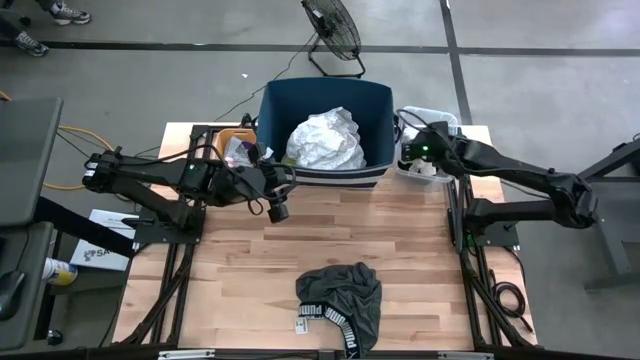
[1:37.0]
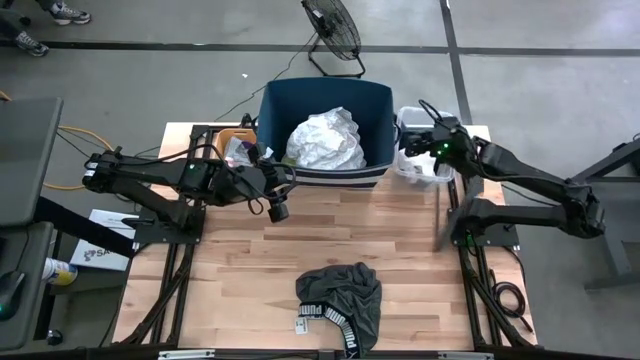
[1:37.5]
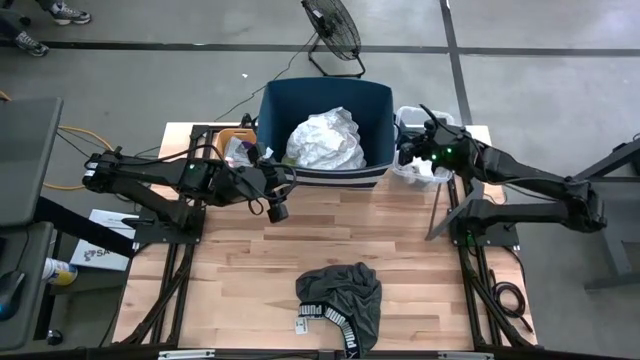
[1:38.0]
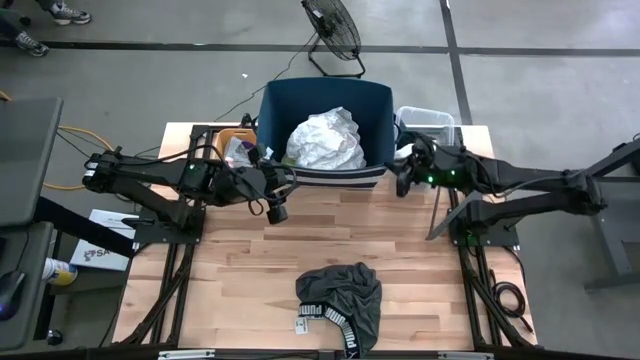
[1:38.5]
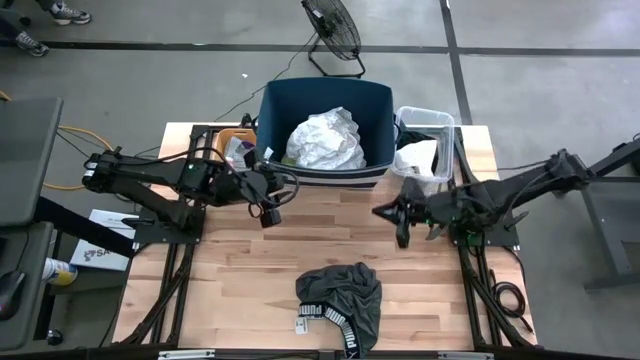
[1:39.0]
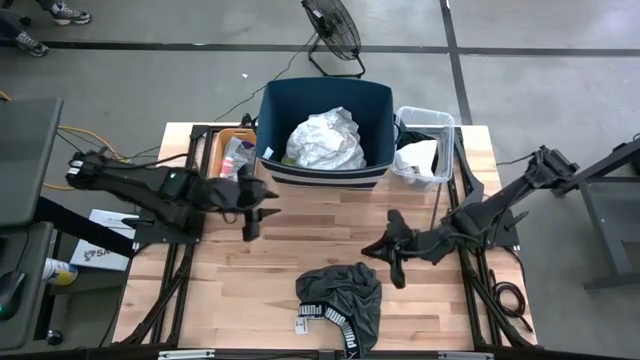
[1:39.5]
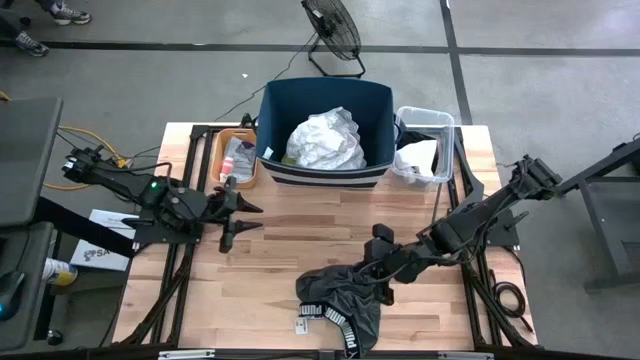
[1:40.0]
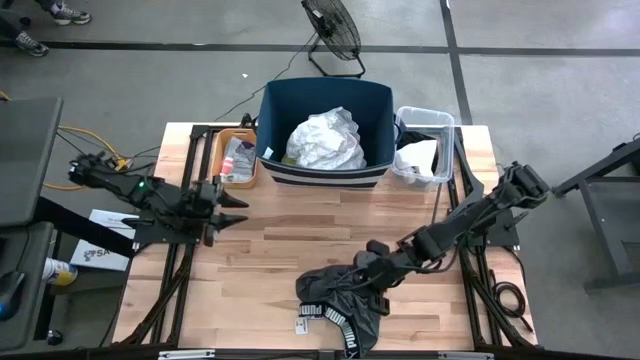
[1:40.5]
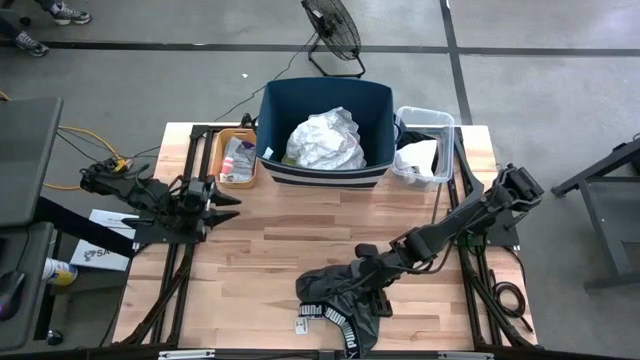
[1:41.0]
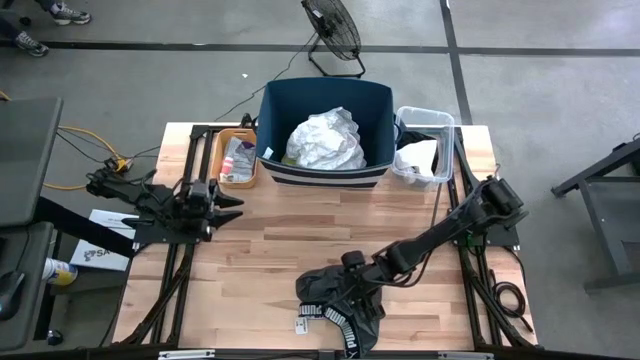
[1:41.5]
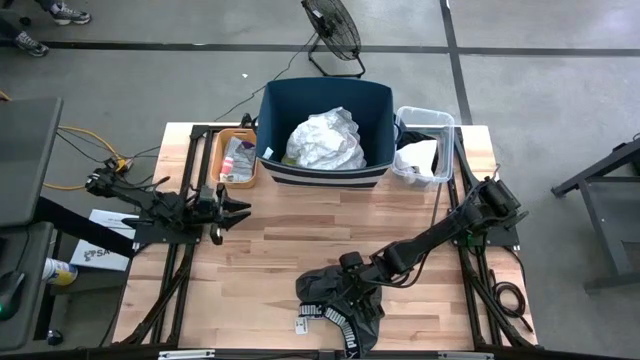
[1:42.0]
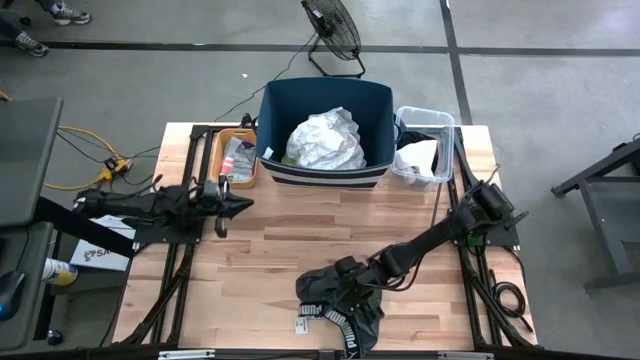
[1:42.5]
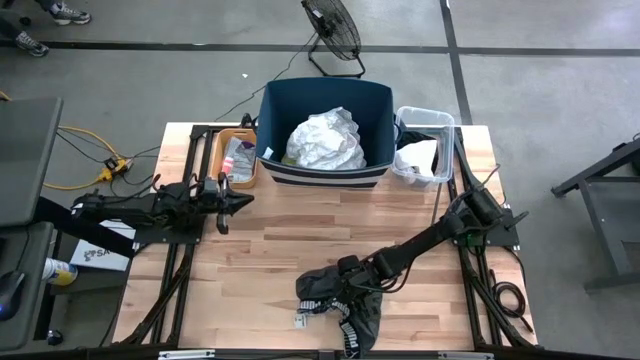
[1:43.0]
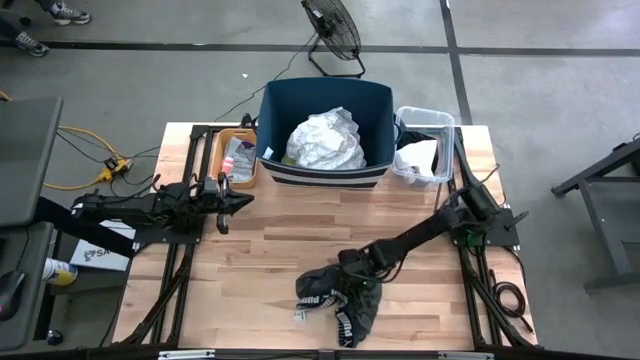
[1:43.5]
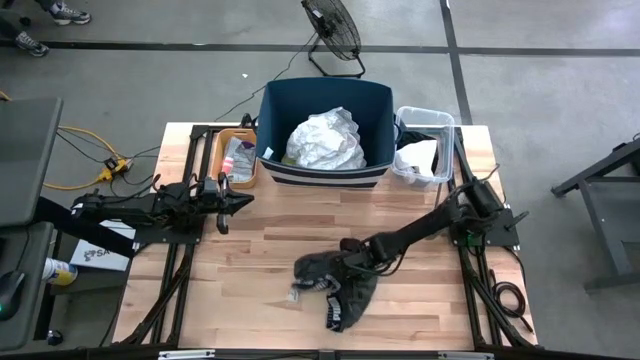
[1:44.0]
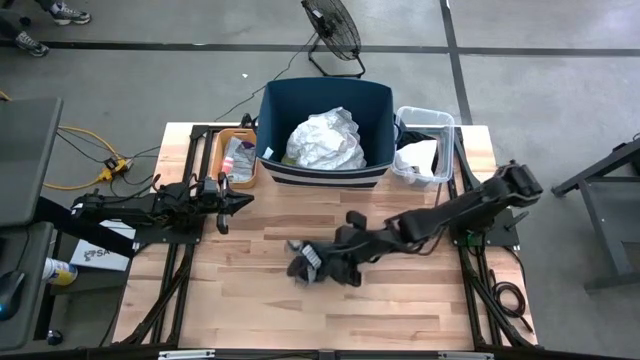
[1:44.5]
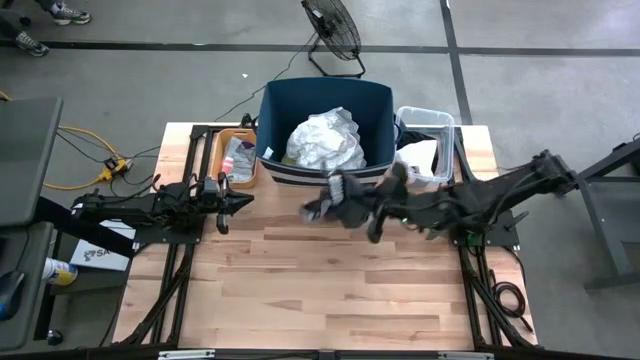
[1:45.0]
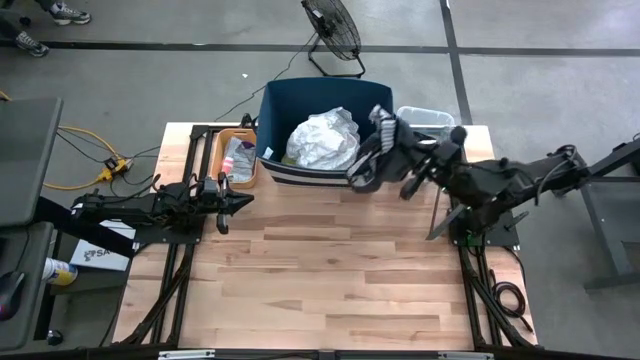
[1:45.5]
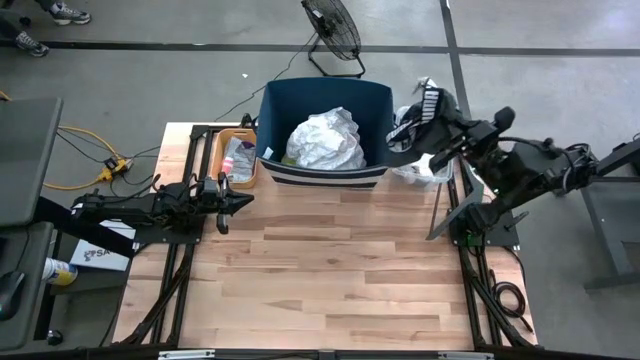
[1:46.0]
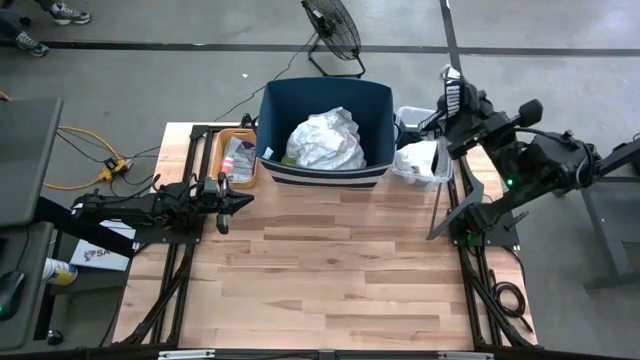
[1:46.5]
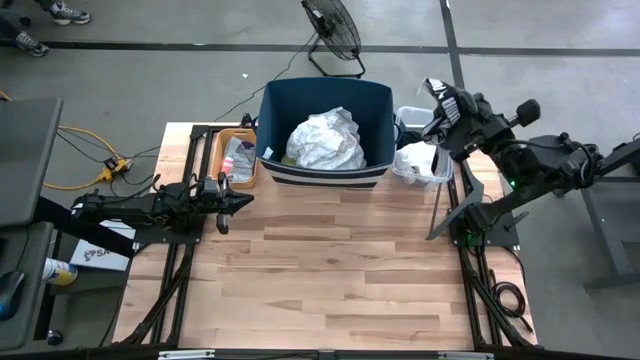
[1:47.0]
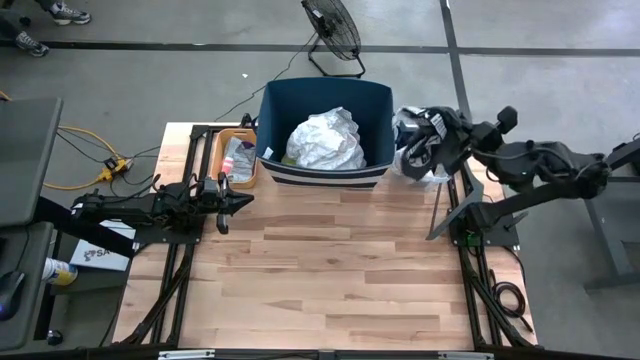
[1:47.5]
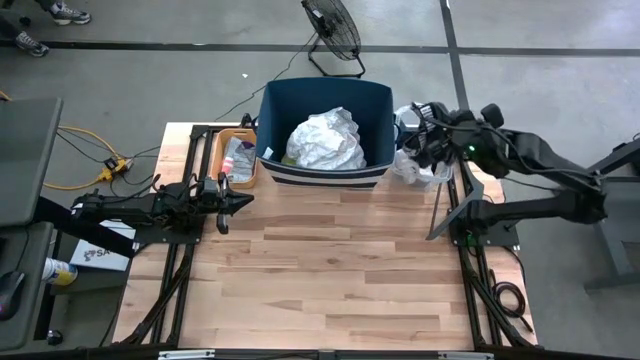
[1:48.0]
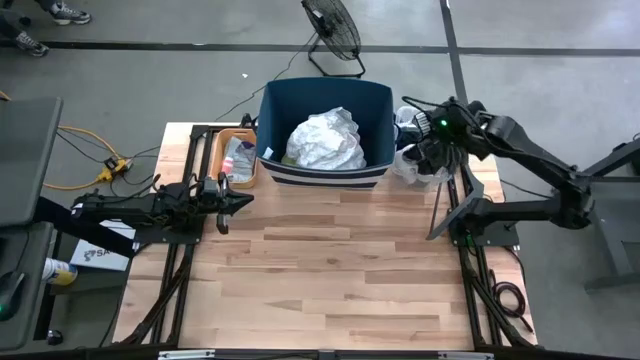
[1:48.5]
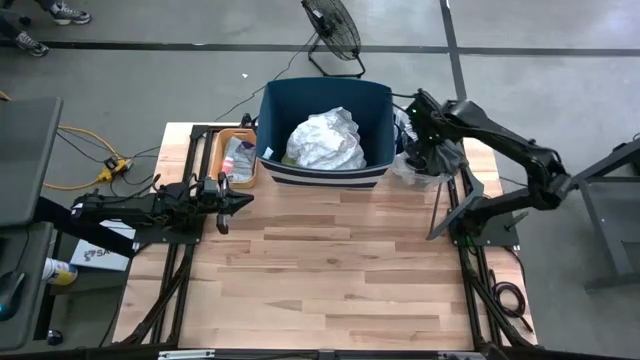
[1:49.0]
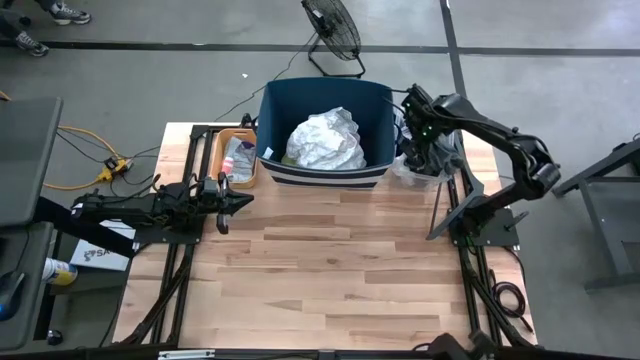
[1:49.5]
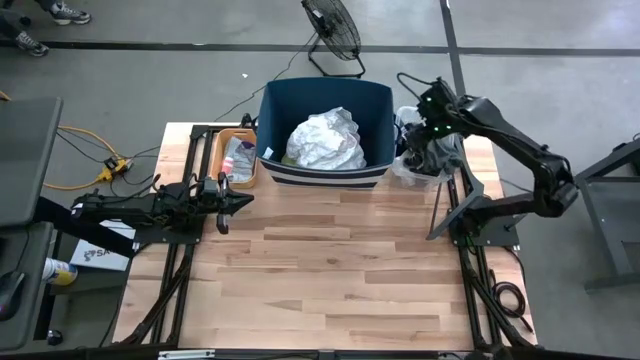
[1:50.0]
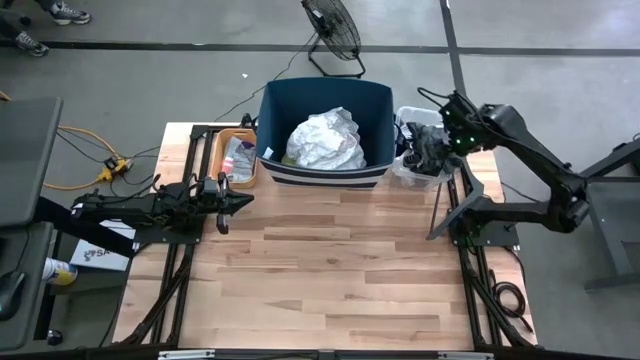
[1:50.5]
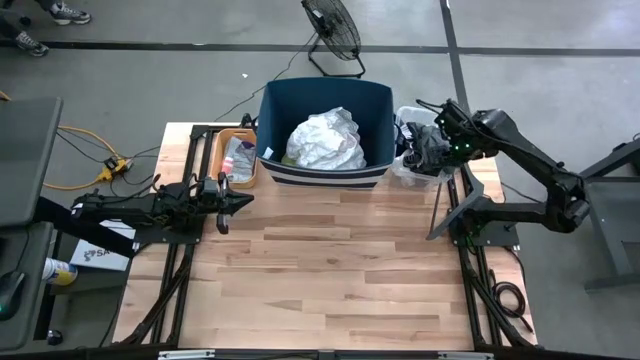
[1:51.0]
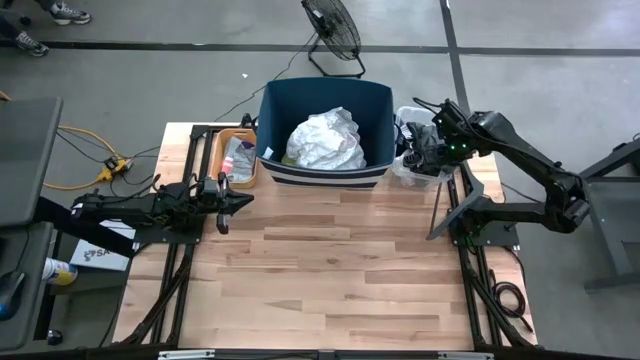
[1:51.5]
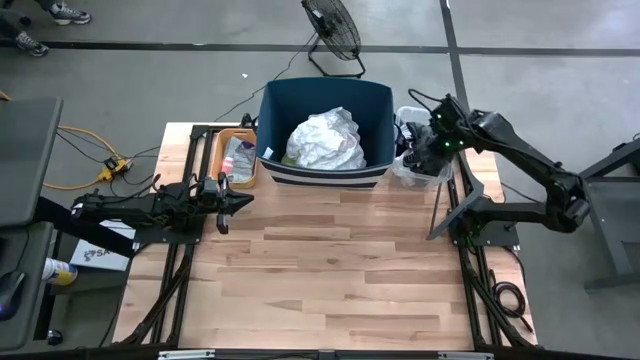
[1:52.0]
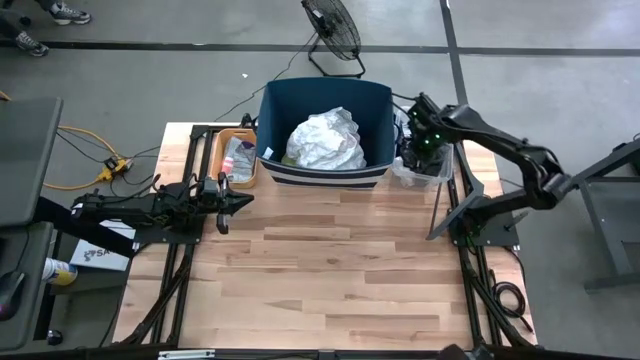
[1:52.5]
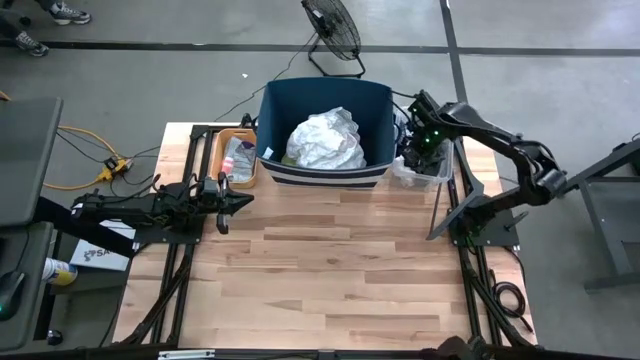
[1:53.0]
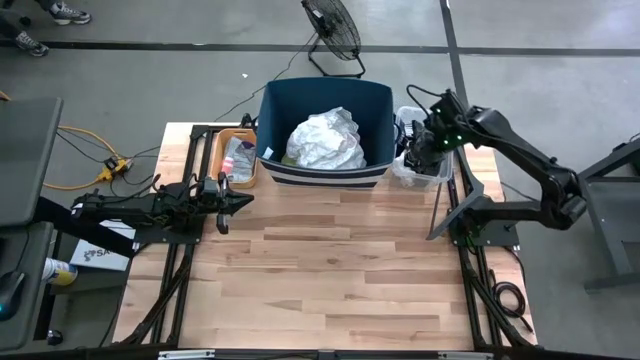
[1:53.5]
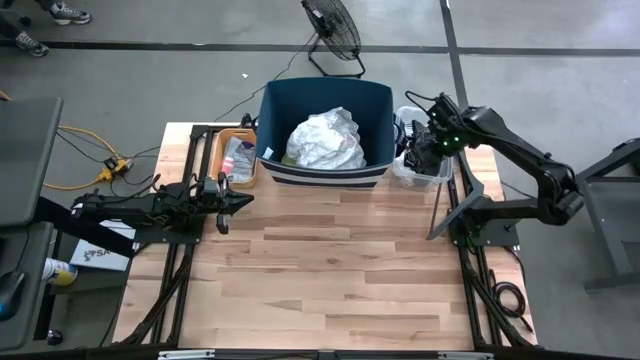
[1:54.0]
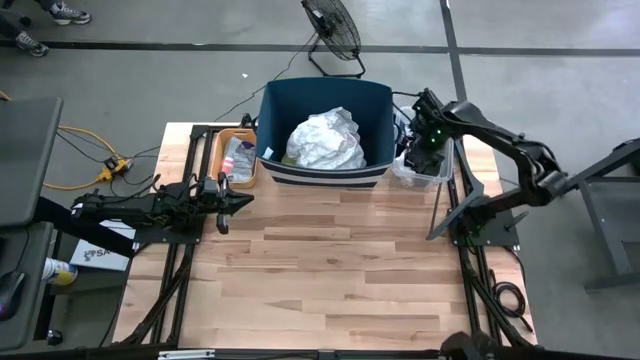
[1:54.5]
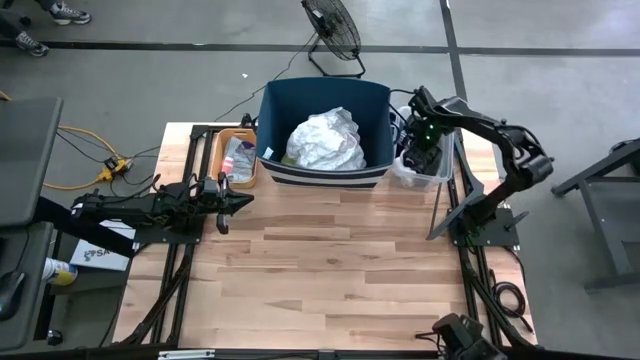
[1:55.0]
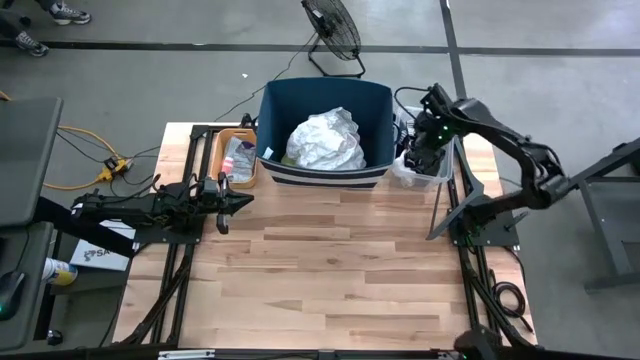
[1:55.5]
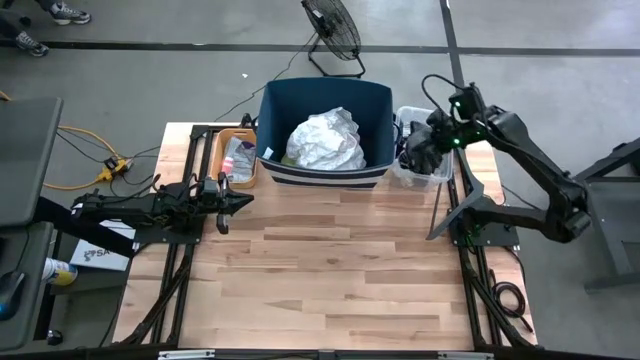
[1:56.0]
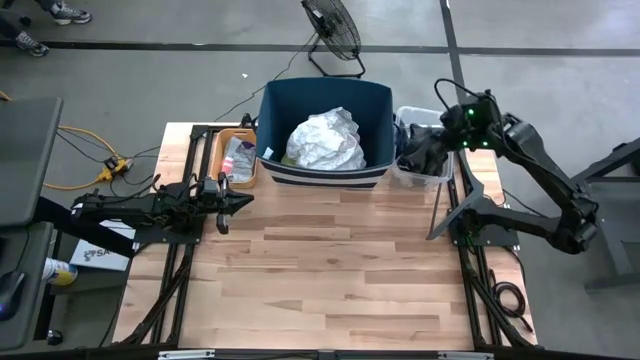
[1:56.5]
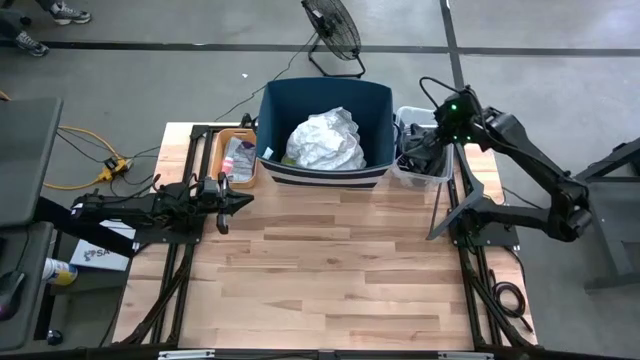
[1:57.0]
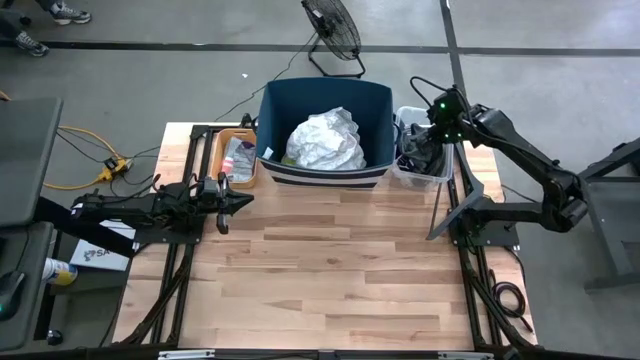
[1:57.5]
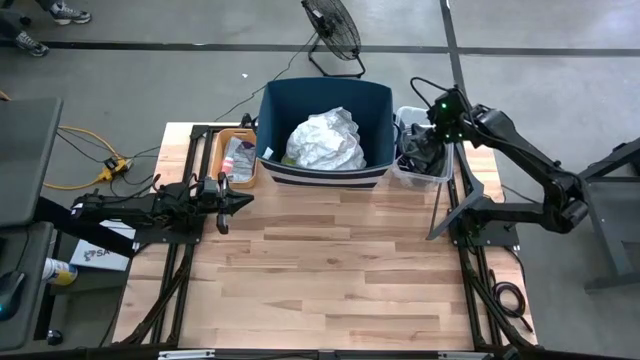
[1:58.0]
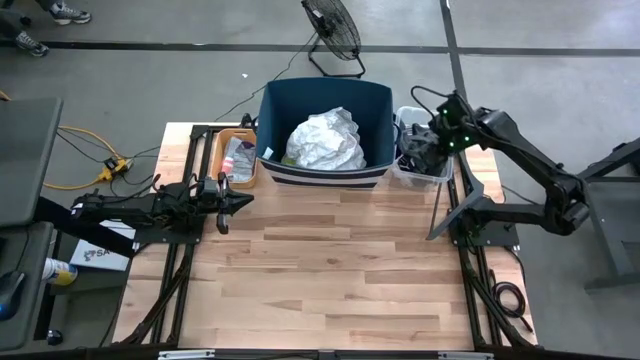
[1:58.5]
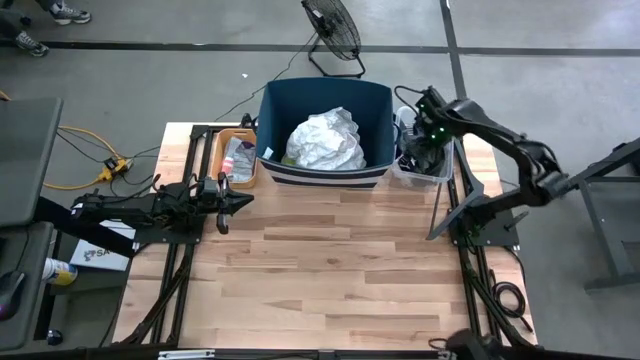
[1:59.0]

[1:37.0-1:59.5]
Task: Pick & Place Cloths
Put the gray underwear into the transparent bin
